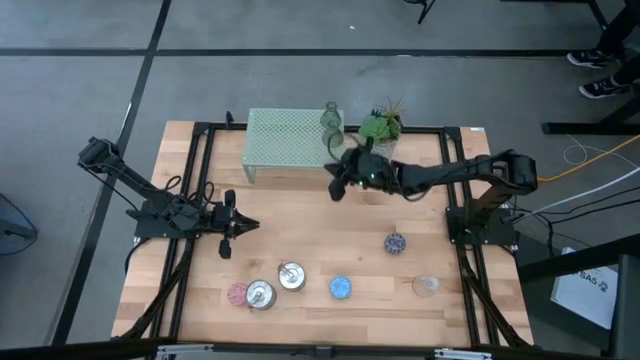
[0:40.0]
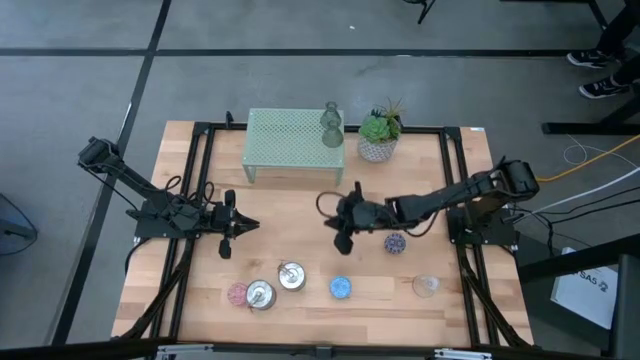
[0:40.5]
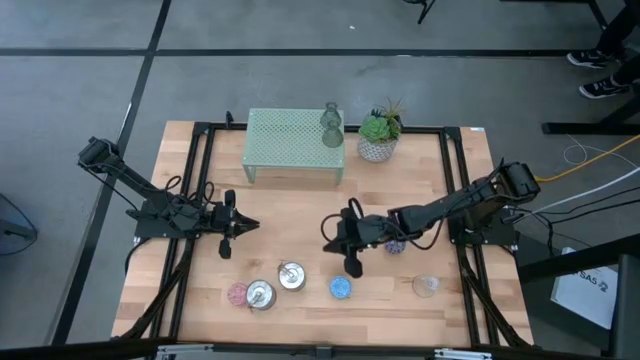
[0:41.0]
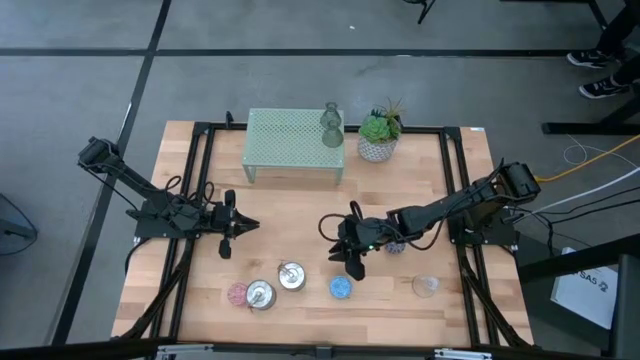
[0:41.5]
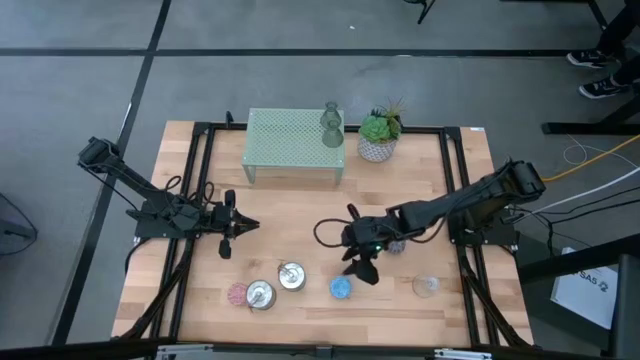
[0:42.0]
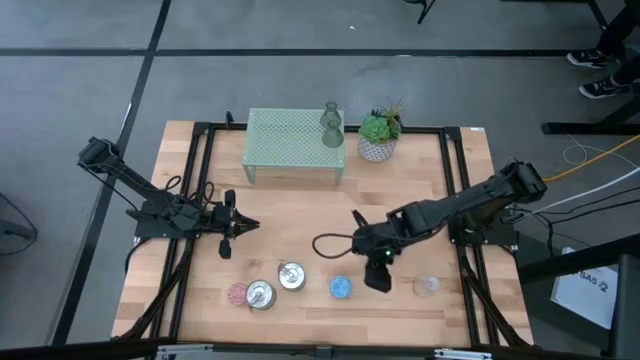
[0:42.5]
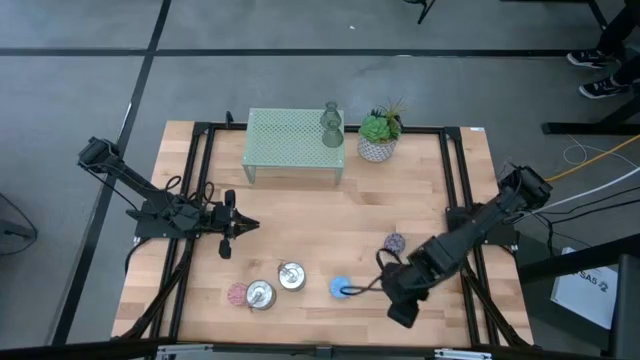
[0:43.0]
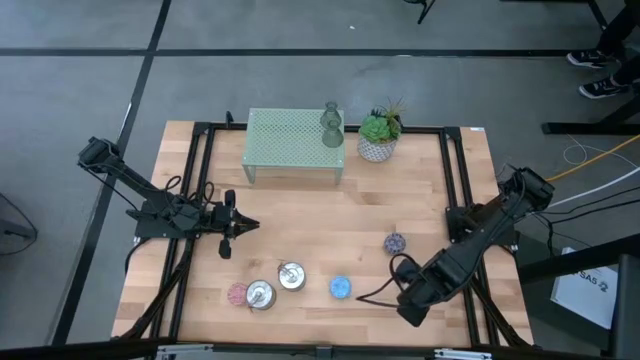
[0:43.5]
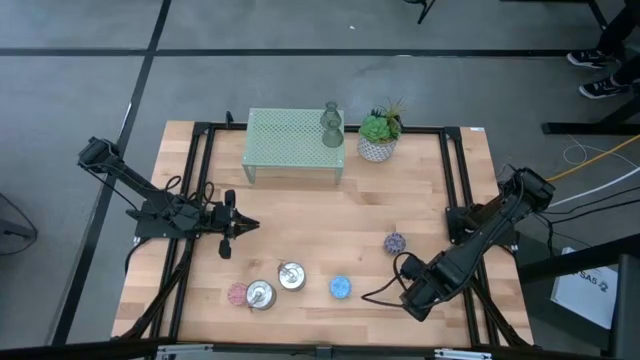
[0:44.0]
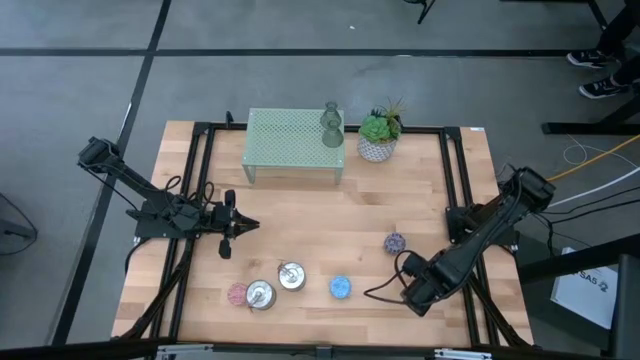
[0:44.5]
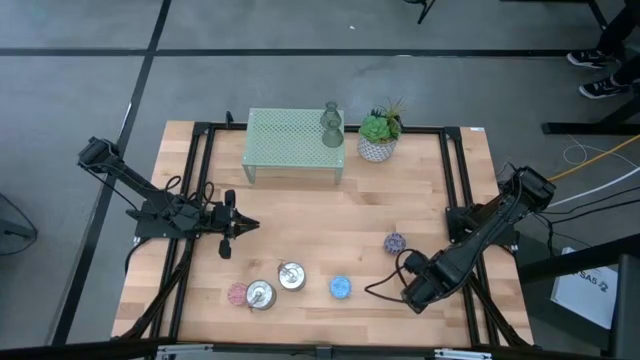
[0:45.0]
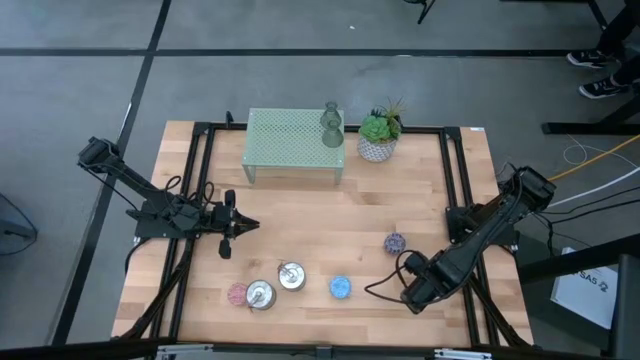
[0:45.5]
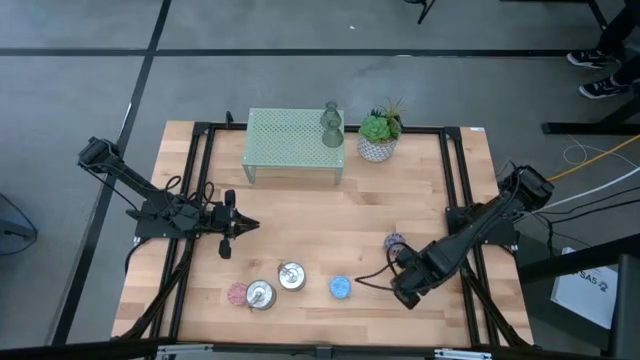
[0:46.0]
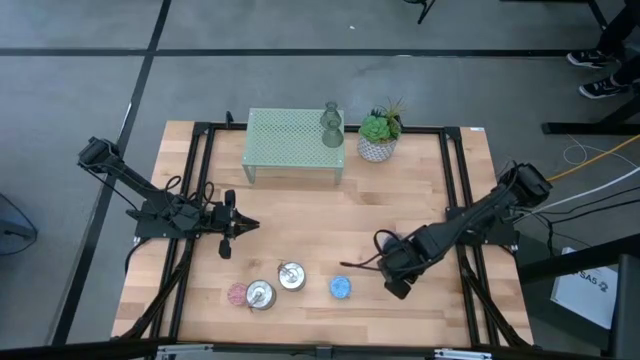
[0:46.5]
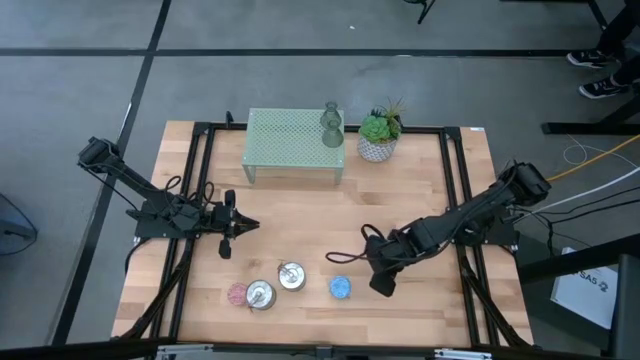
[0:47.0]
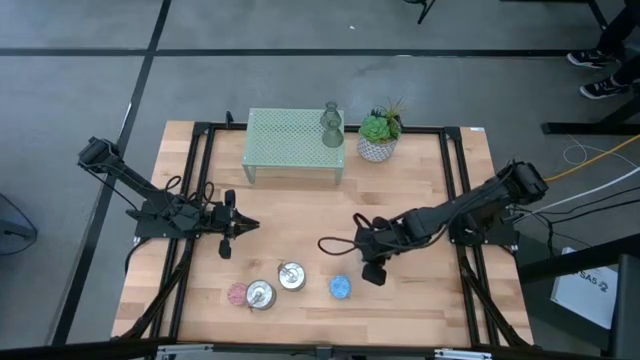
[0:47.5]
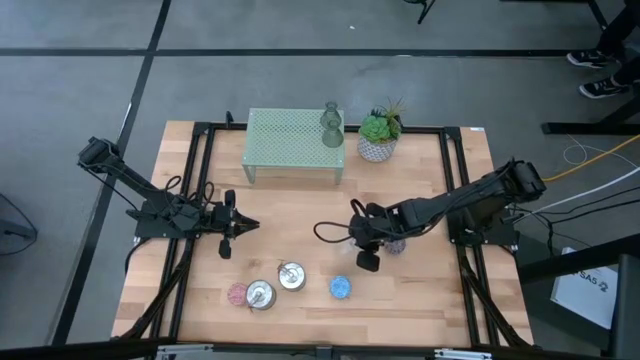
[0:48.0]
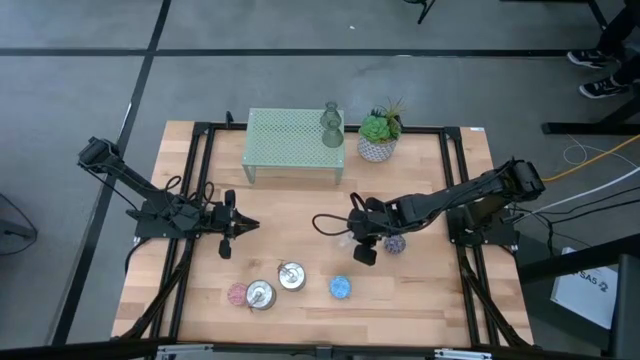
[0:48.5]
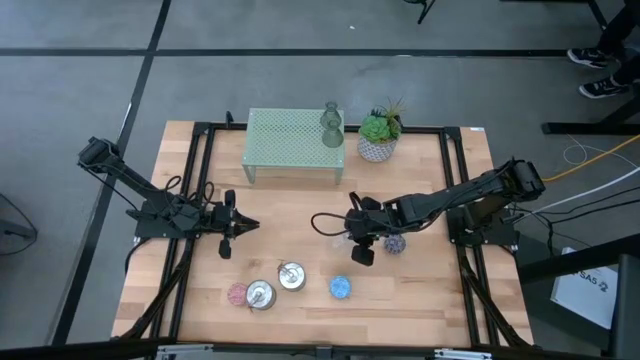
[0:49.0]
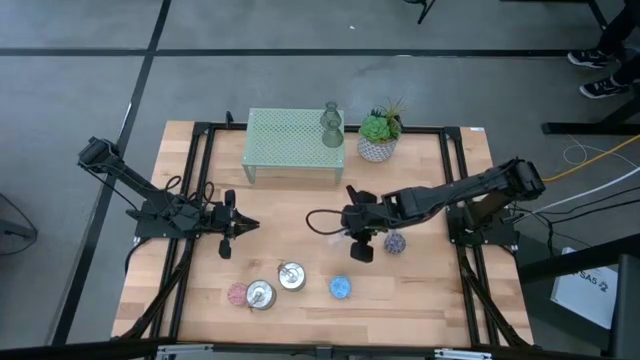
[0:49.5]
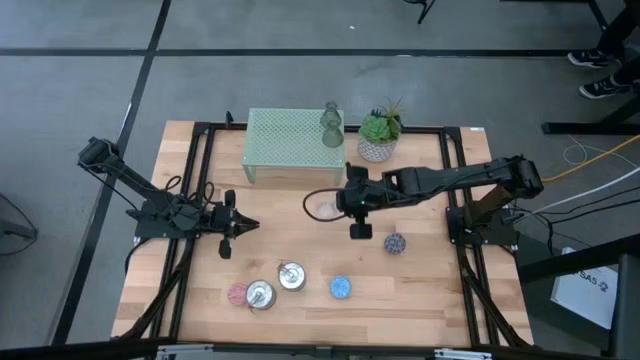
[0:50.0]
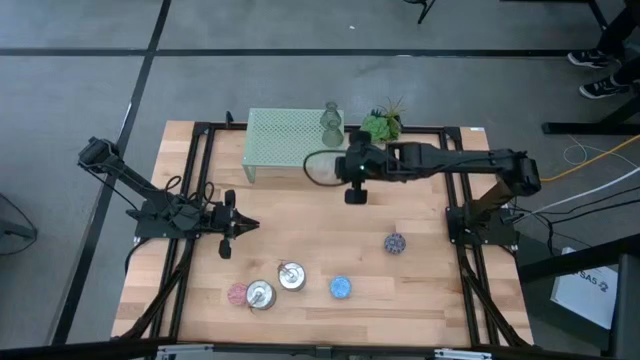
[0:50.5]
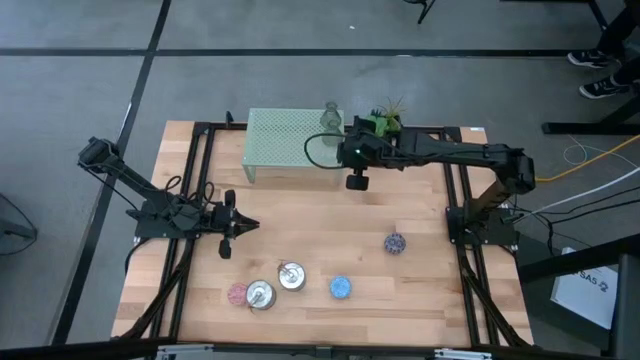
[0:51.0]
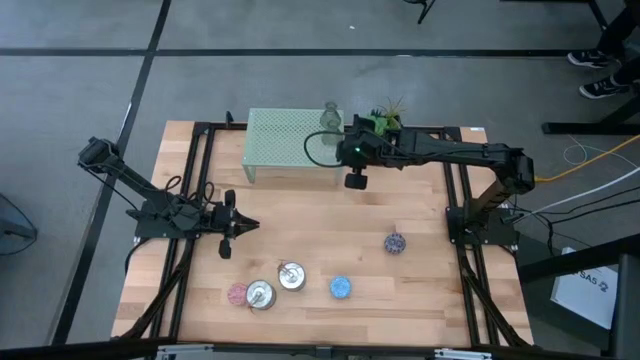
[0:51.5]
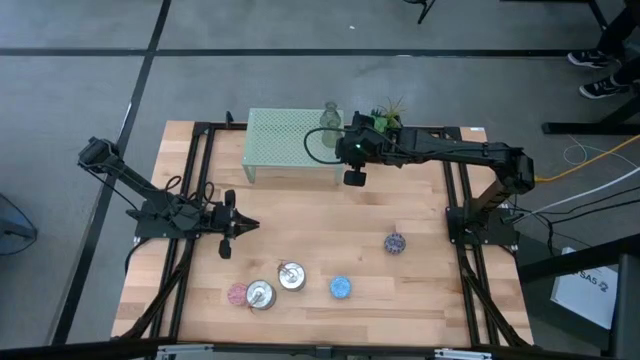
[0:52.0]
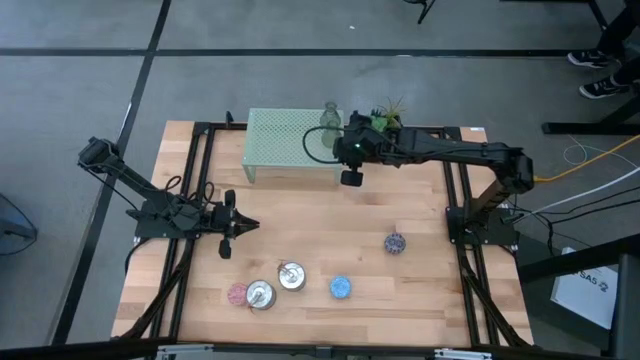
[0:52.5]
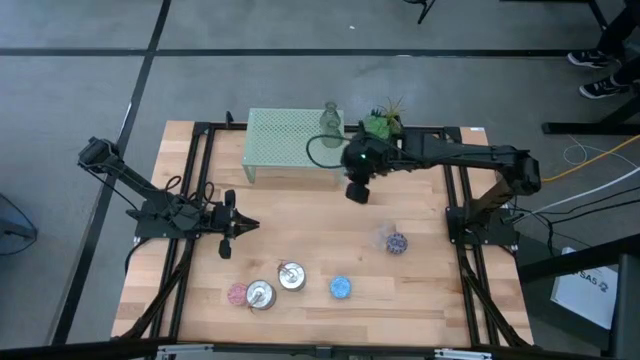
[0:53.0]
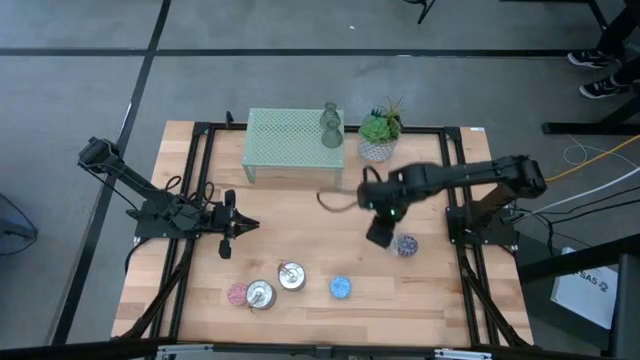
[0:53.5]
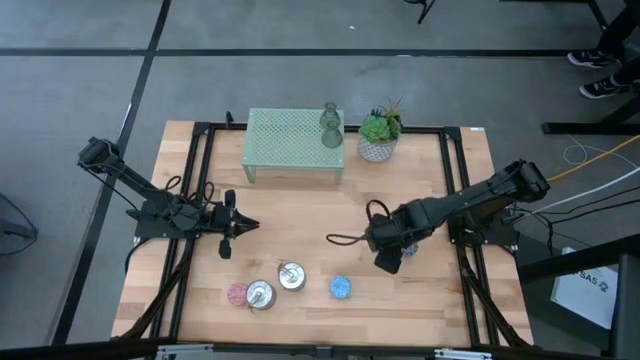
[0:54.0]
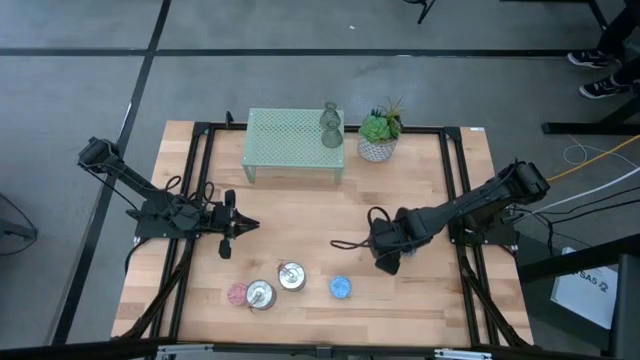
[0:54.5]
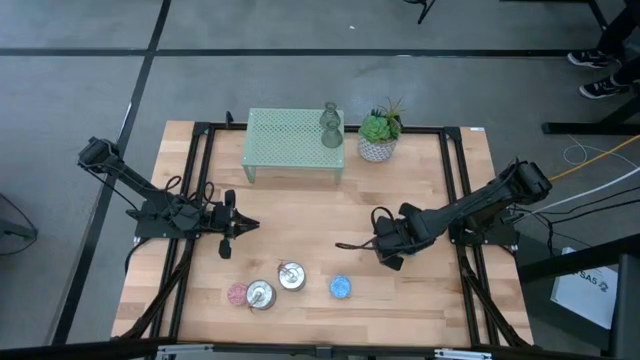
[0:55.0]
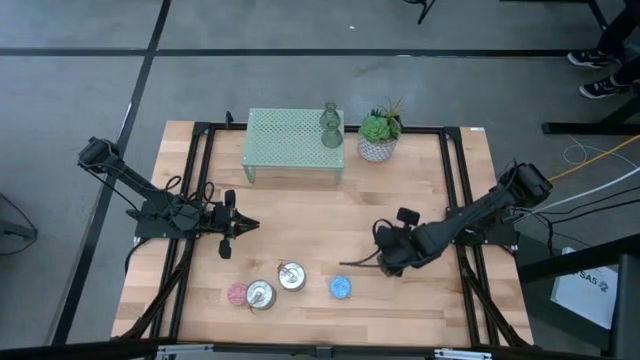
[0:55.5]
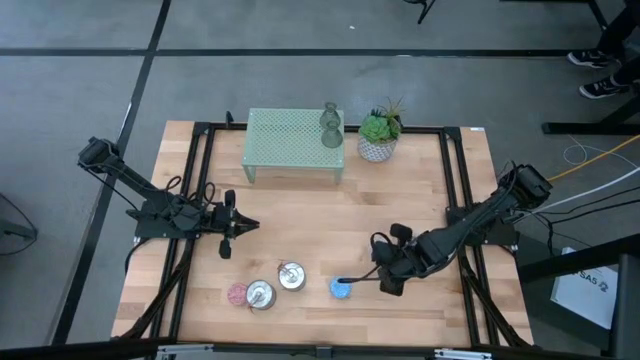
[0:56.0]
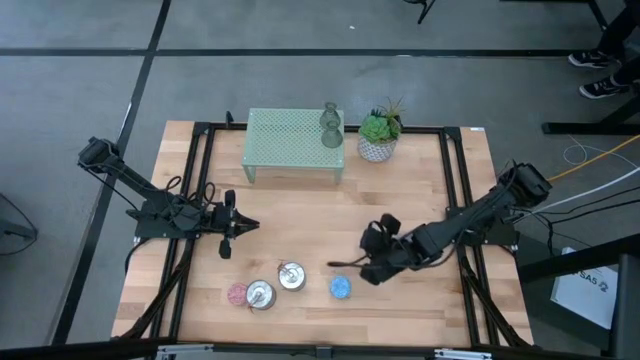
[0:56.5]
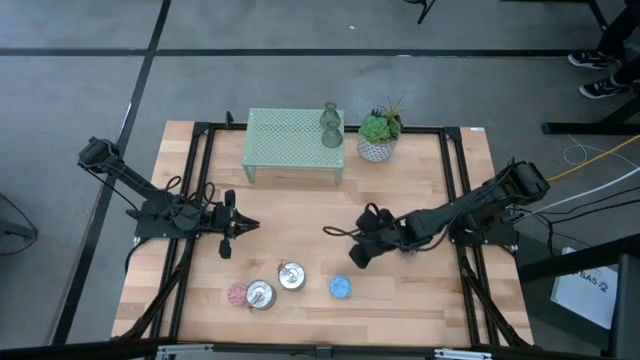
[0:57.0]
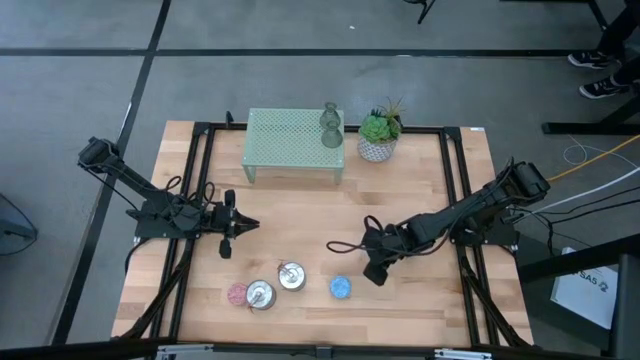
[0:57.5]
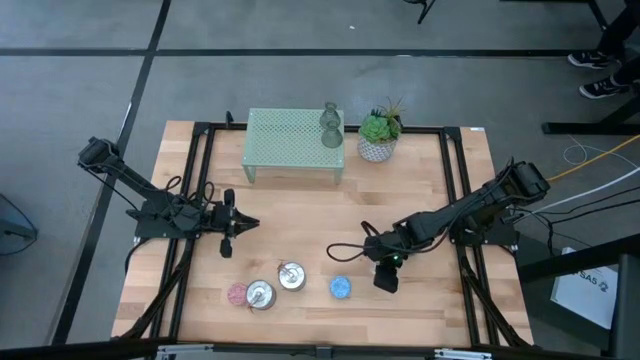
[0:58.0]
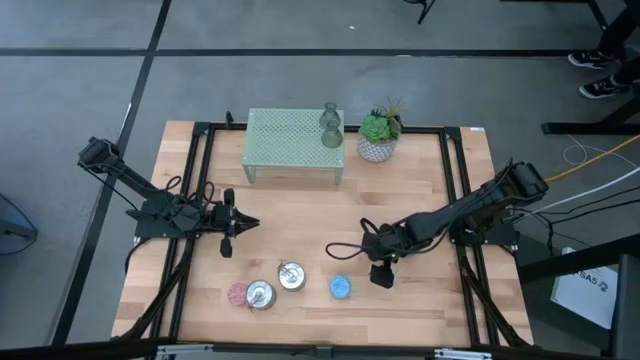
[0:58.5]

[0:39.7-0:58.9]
Task: Pick & Place candle stick holders
Put the transparent glass candle holder on the shelf

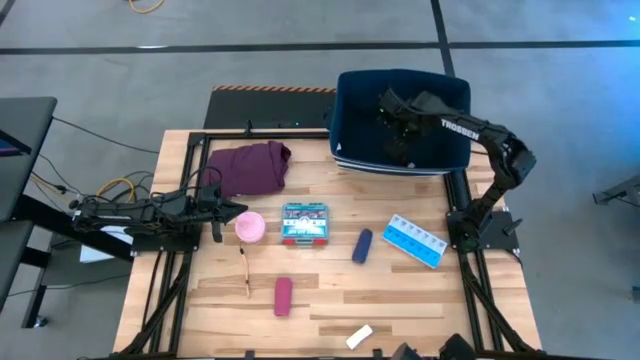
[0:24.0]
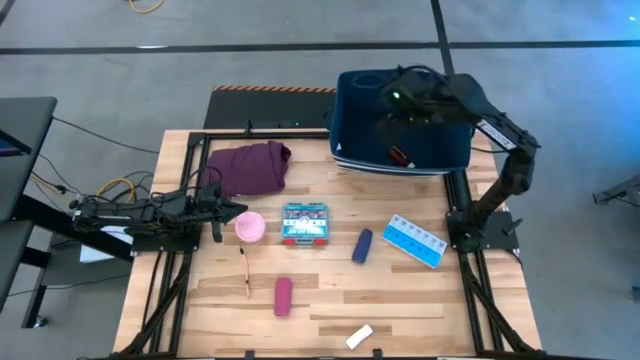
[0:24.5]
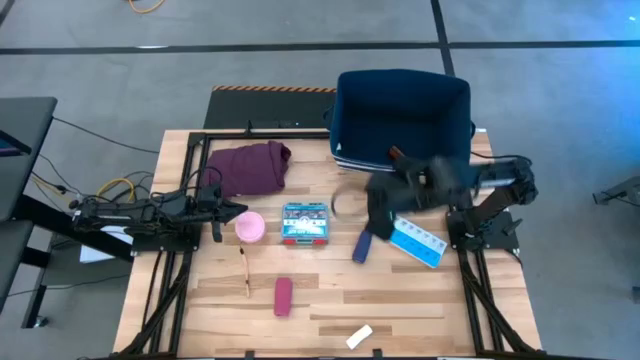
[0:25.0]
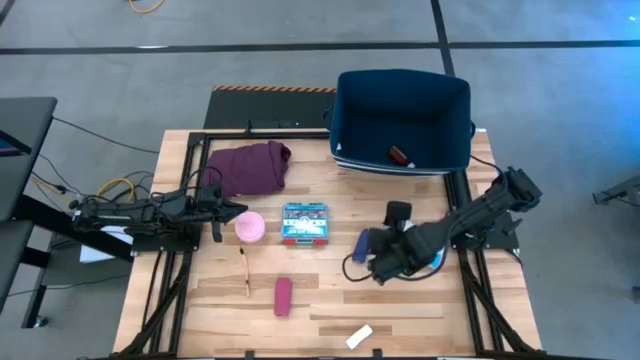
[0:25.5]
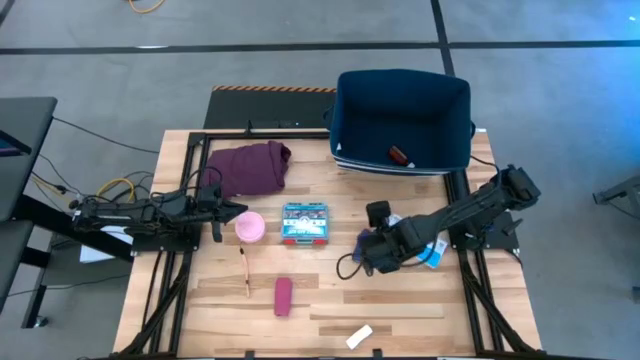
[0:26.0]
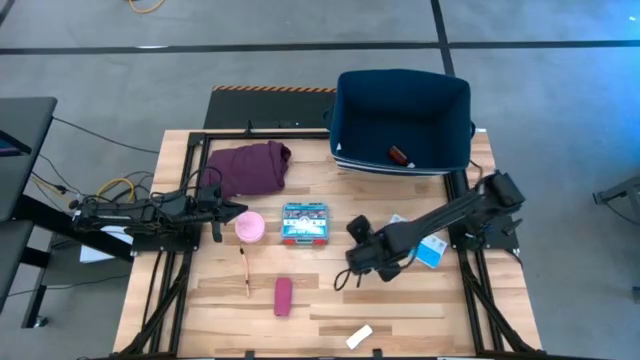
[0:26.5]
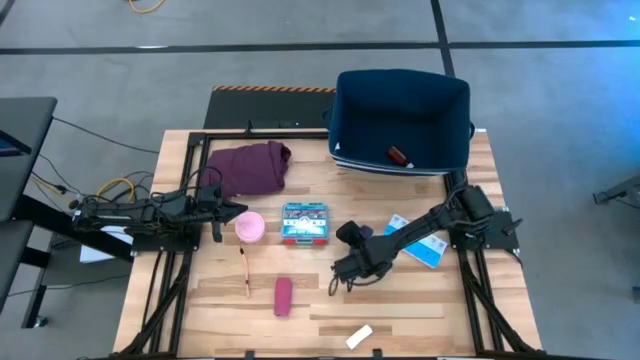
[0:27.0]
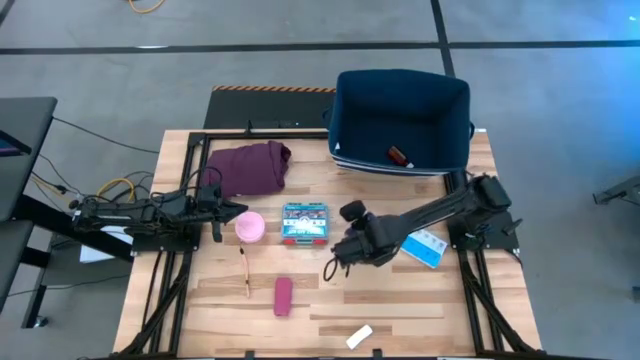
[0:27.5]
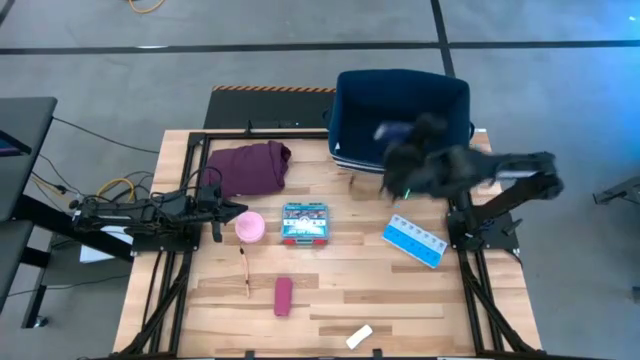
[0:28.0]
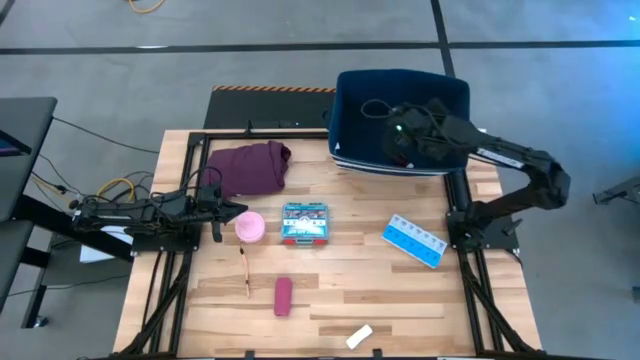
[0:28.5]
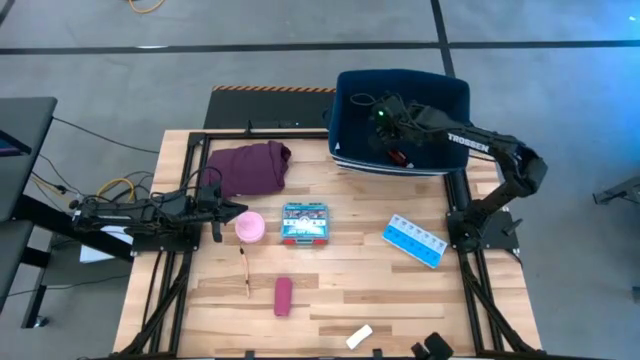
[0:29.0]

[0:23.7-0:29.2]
Task: Pick & place medical supplies in basket/bin
Put the blue bandage into the blue bin
